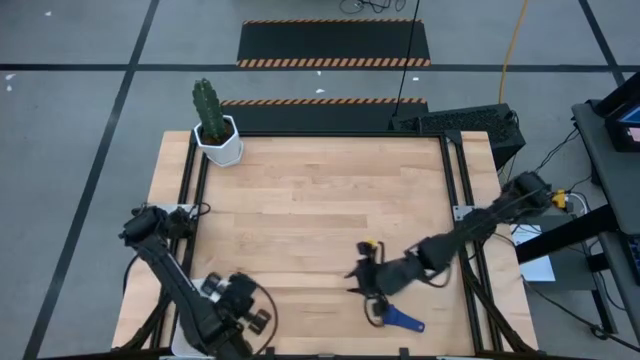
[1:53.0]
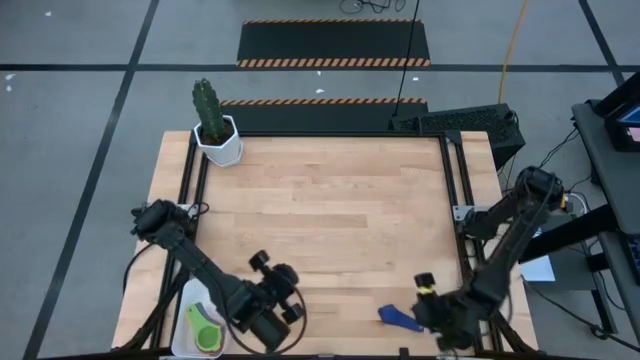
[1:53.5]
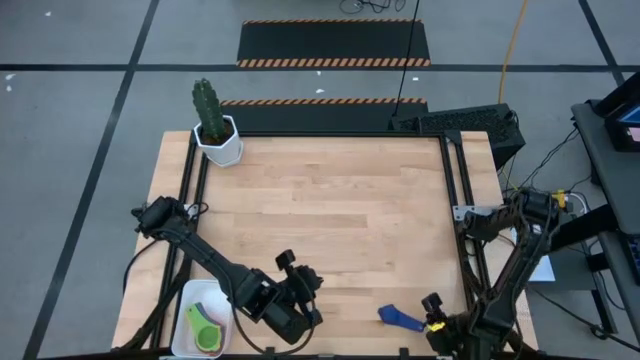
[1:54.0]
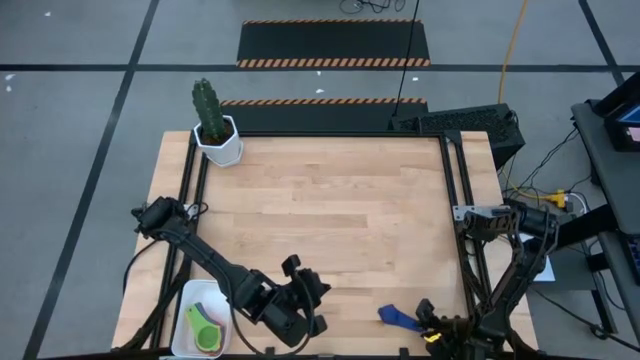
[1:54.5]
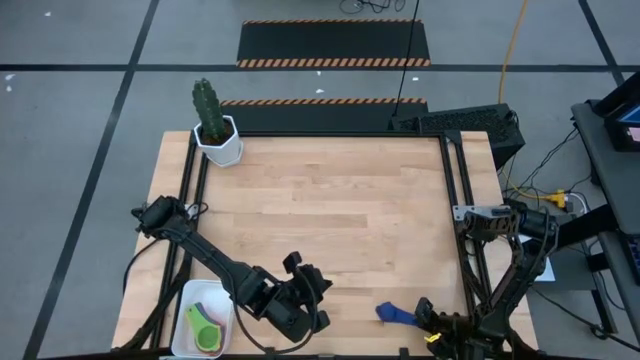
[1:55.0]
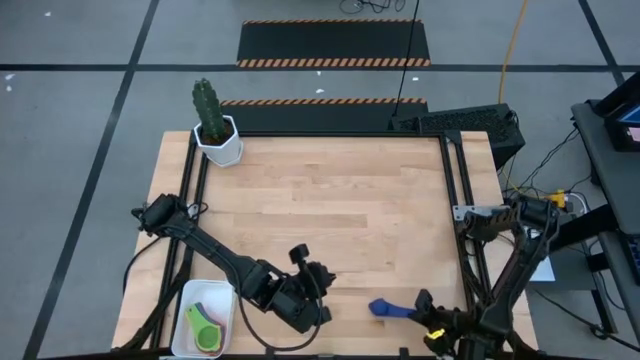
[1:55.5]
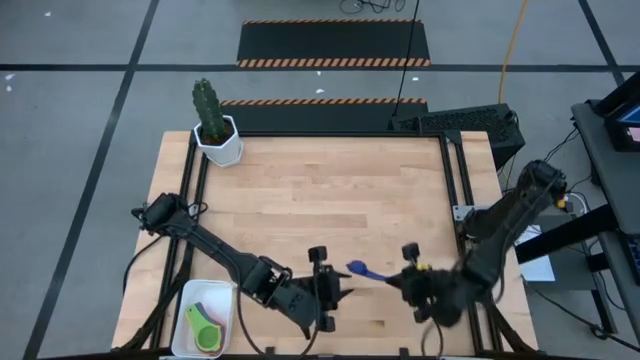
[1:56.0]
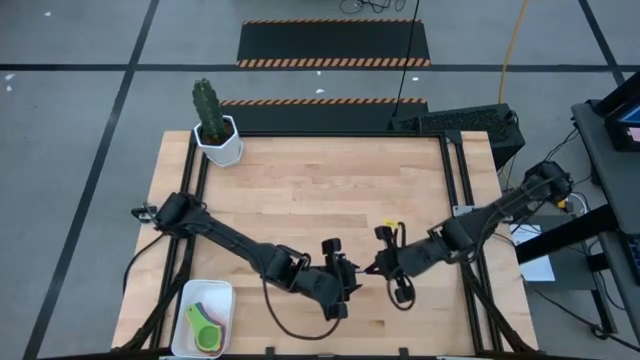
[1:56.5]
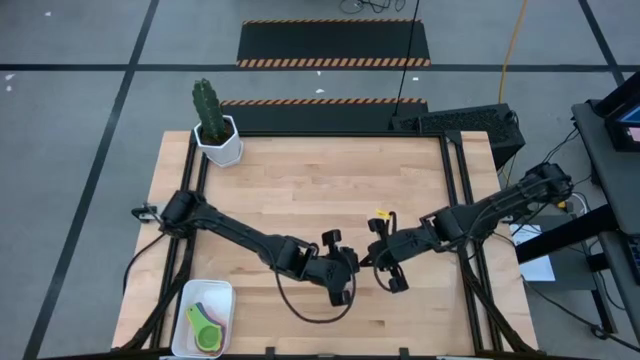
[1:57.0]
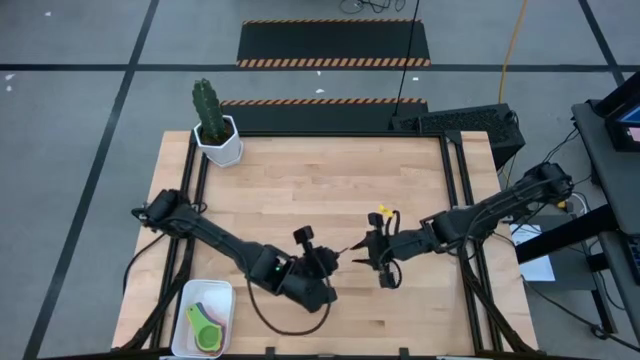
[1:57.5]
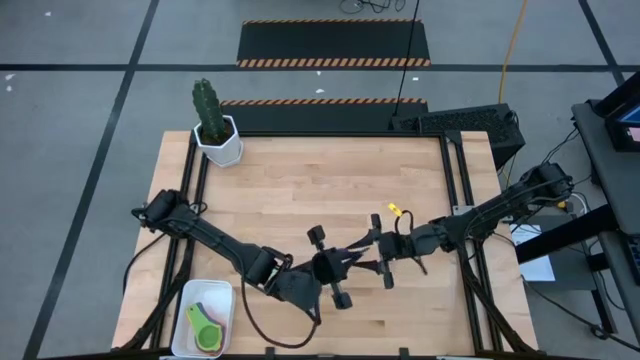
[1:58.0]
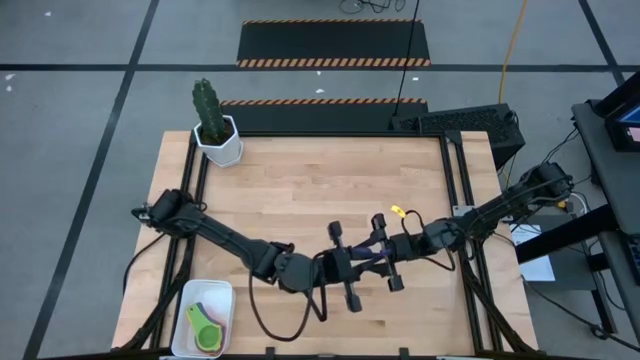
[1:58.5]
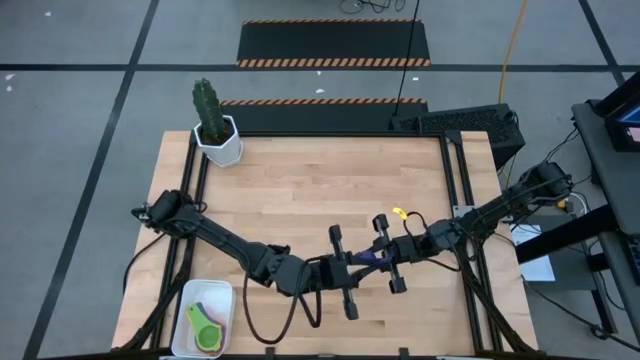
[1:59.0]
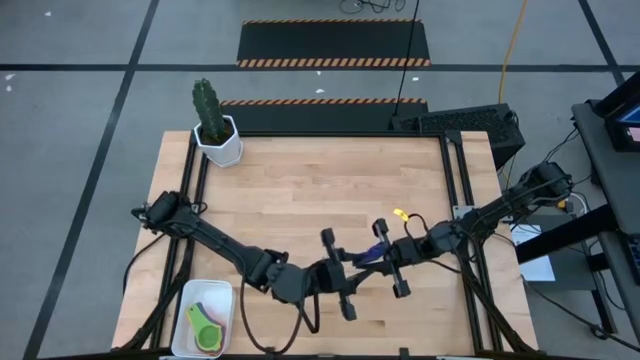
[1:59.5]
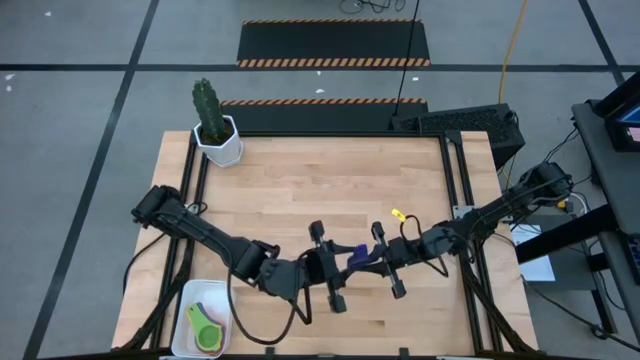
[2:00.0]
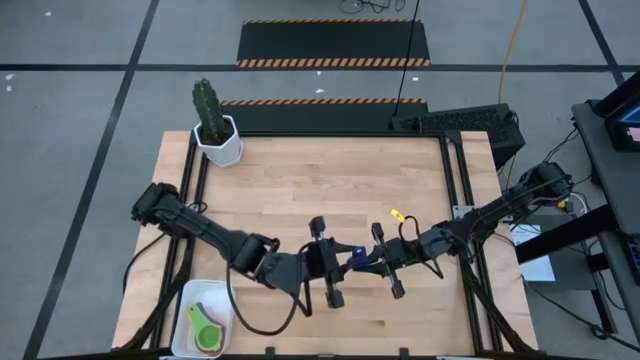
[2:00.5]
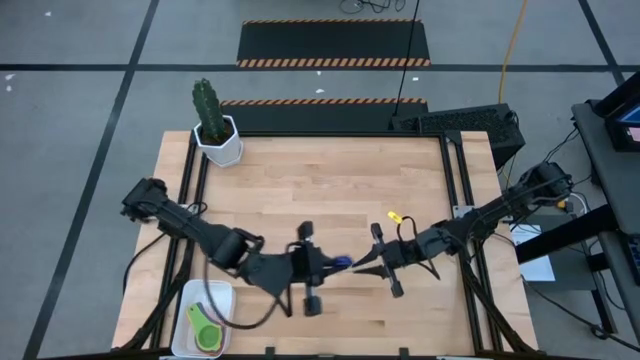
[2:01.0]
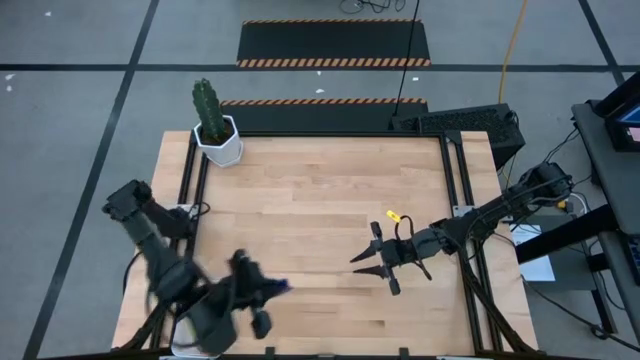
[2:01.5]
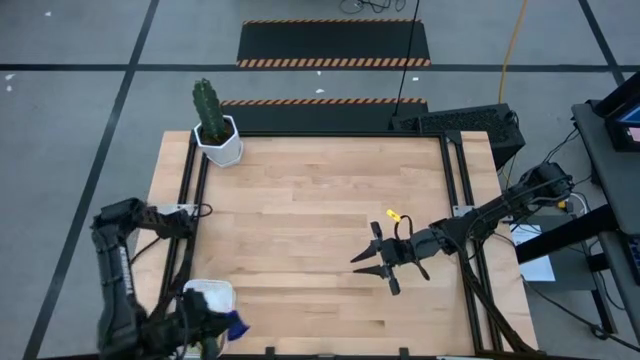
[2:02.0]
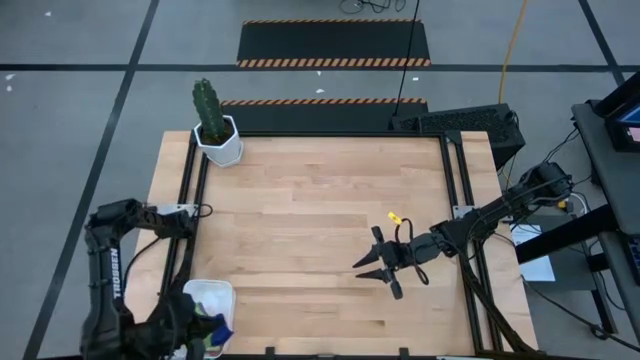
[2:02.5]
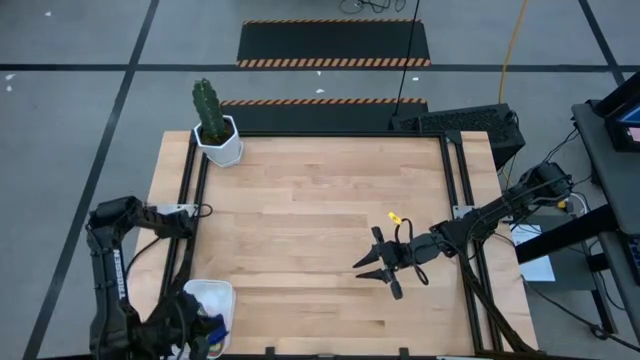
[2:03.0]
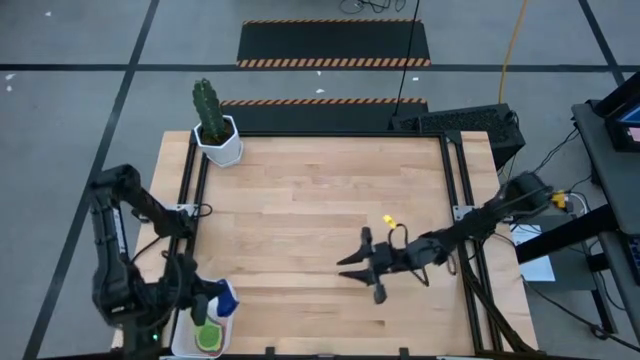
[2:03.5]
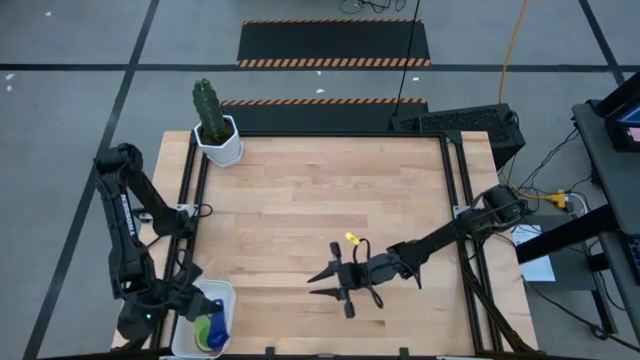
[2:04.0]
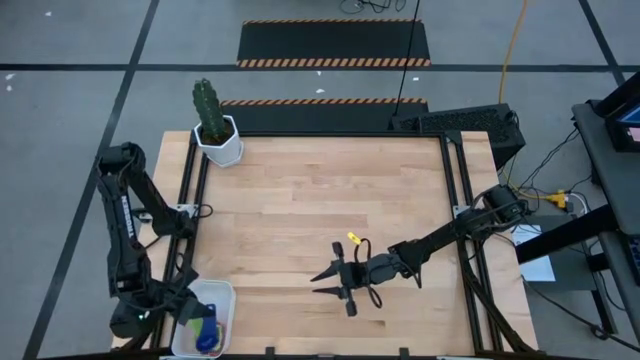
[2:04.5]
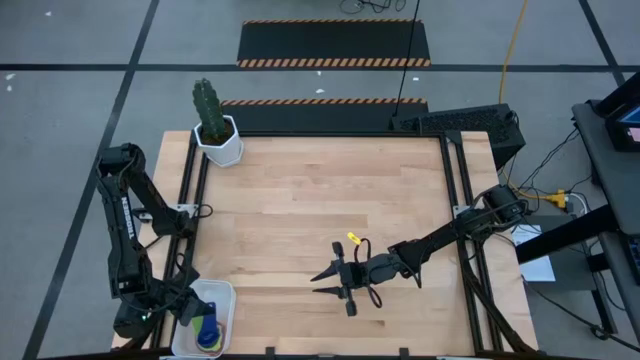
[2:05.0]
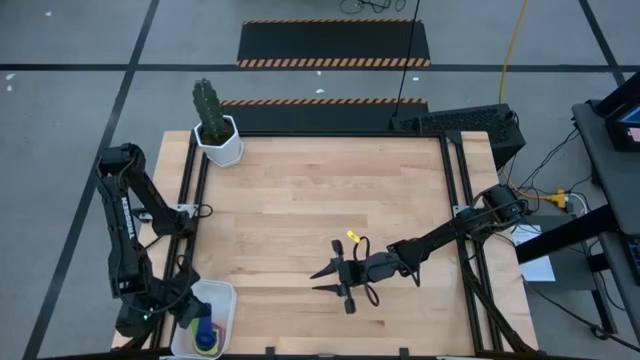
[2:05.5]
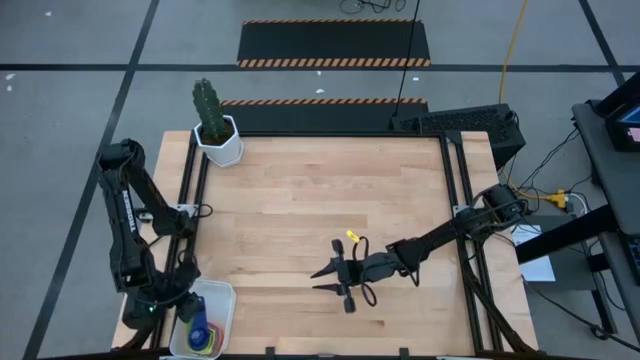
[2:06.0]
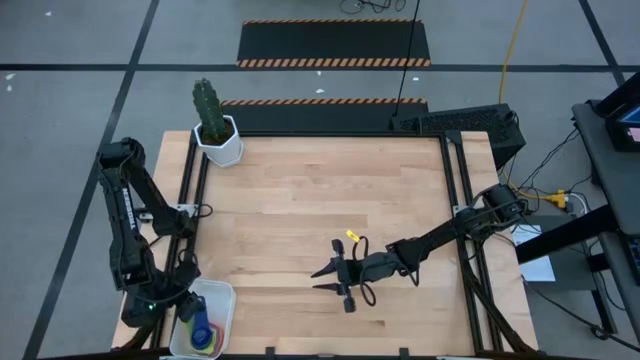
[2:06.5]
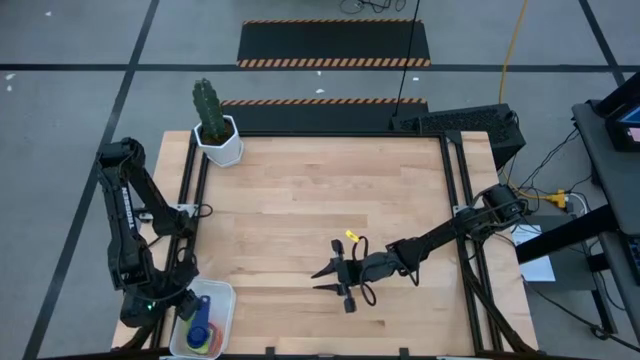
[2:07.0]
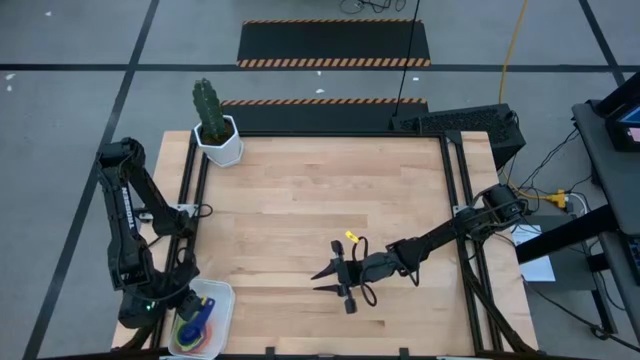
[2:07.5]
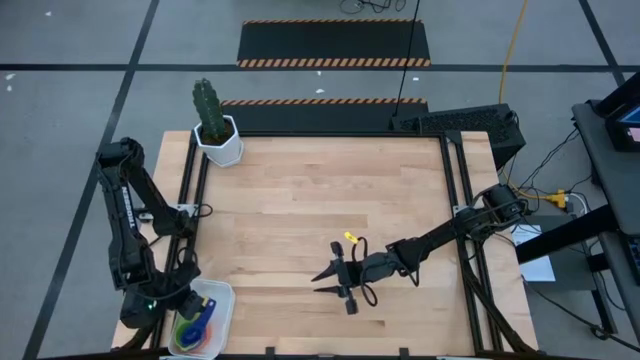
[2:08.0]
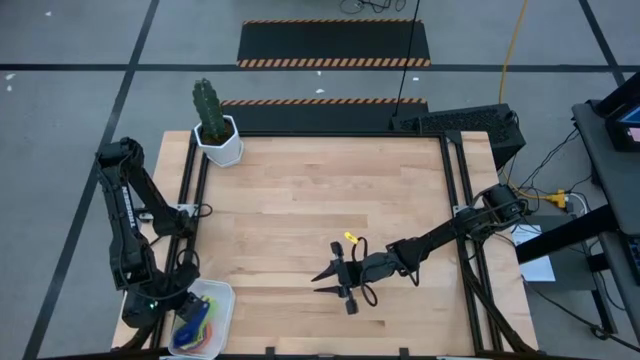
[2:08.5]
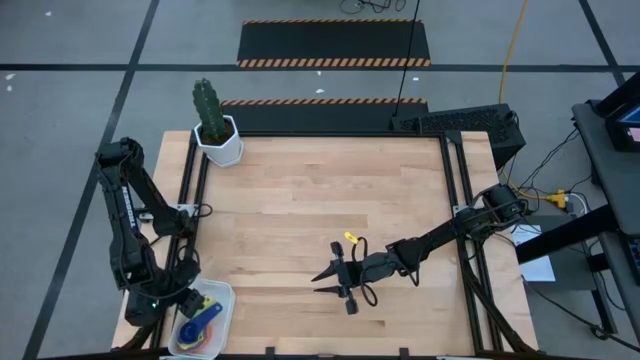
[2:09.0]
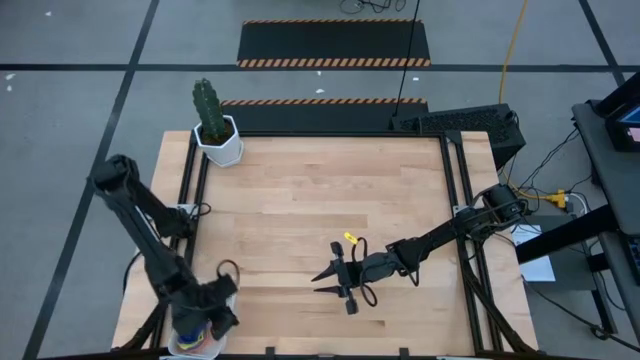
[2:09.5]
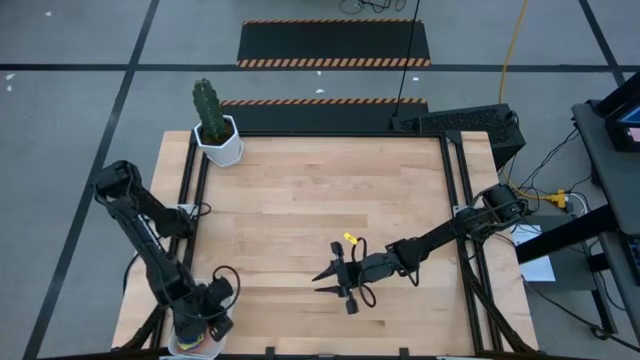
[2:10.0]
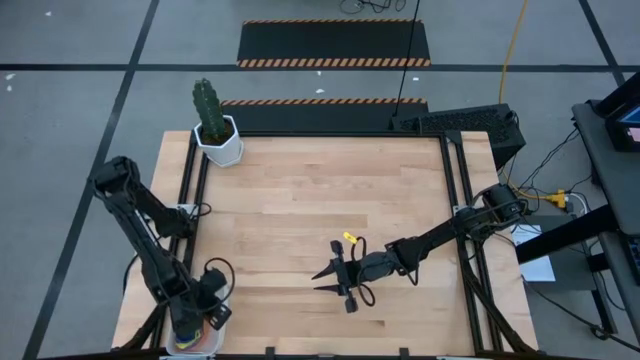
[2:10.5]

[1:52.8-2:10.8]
Task: Nest measuring cups in basket
Stack the dark blue measuring cup on top of the green measuring cup into the white bin

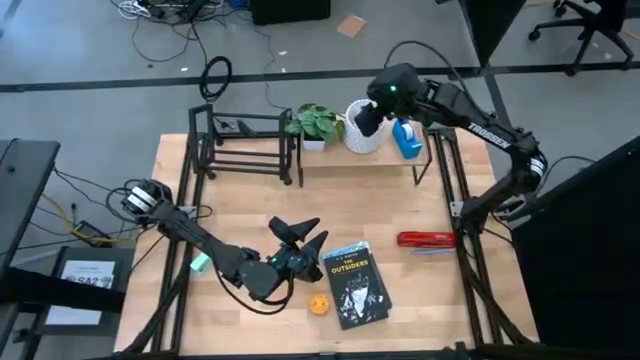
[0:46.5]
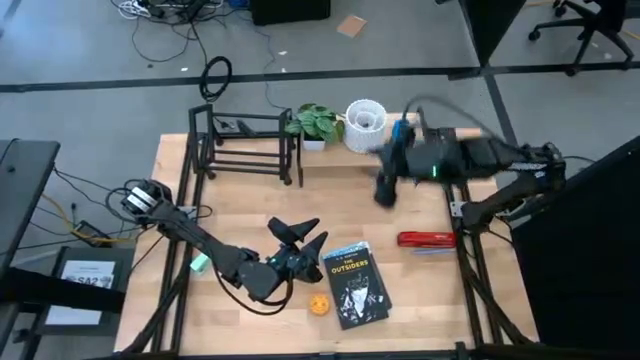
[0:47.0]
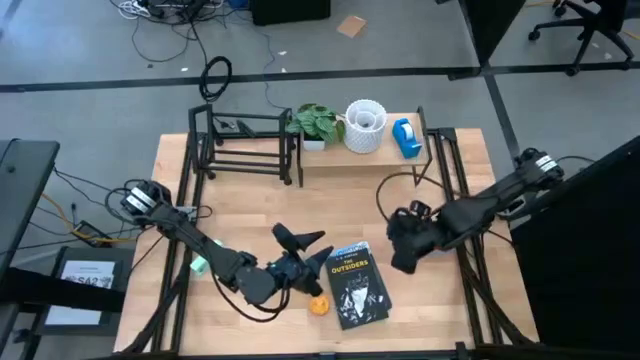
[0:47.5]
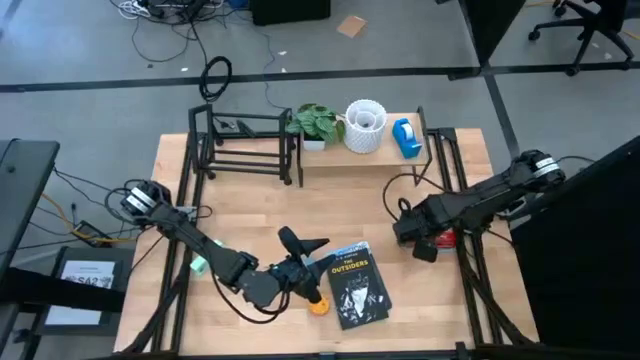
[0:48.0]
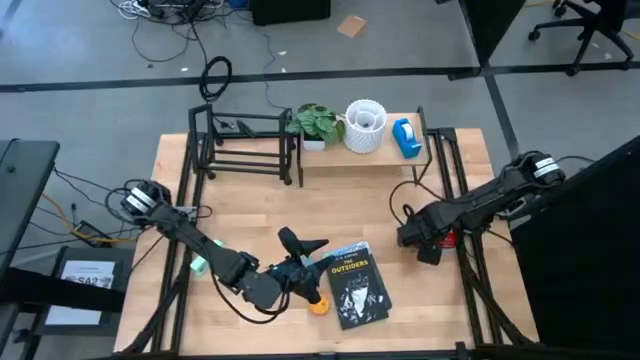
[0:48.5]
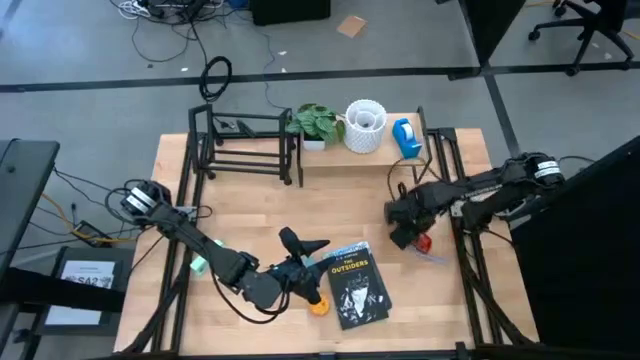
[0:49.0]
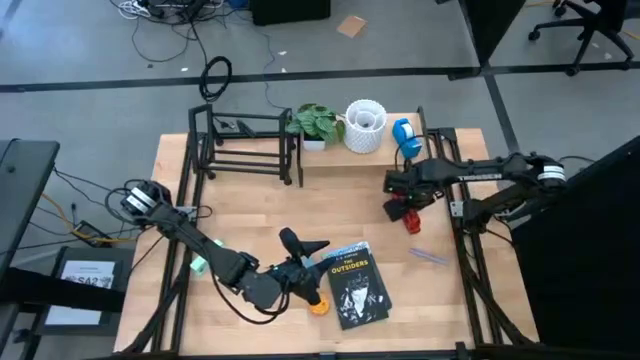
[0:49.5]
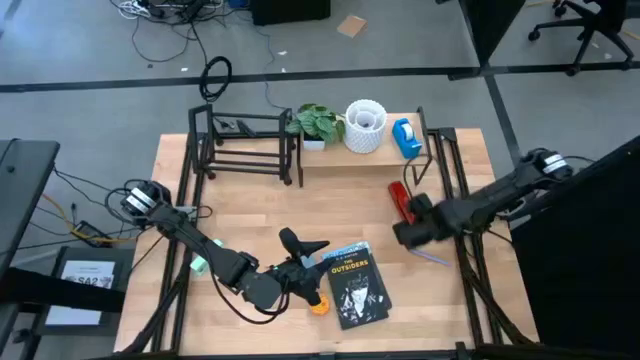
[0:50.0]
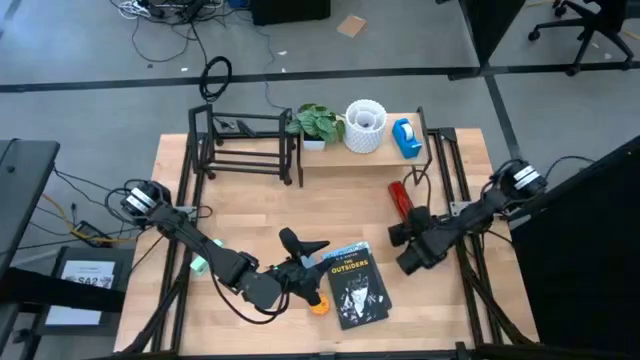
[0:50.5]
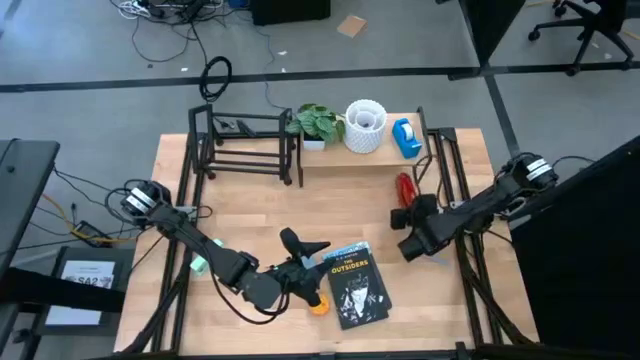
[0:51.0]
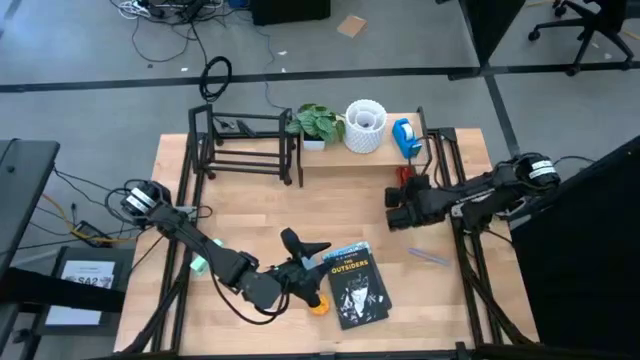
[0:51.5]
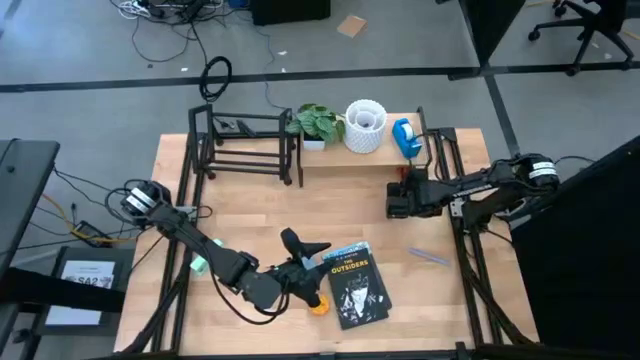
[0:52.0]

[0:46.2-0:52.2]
Task: Stock shelves
Put the red stapler under the shelf
